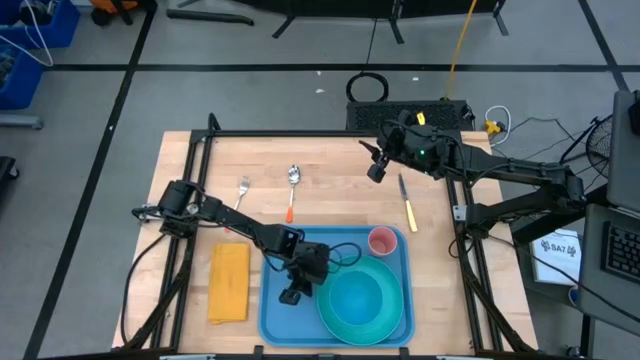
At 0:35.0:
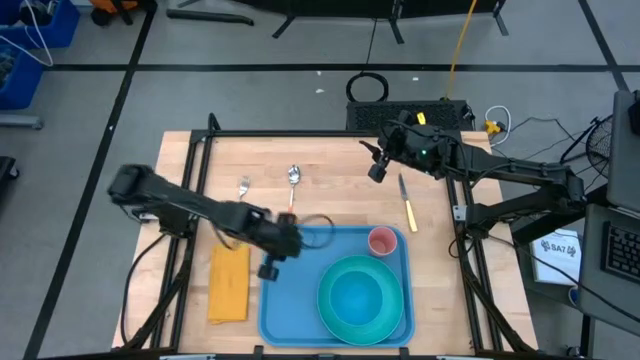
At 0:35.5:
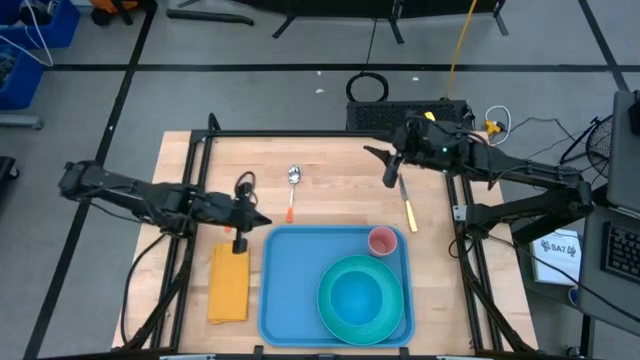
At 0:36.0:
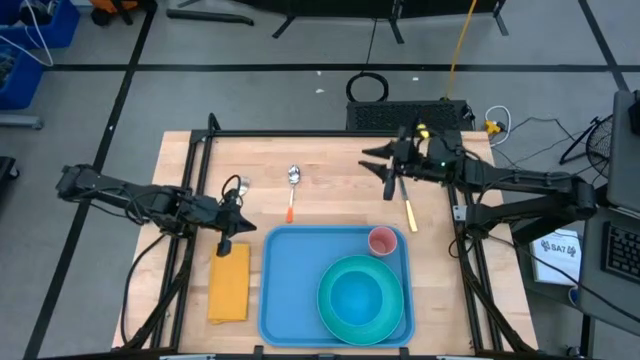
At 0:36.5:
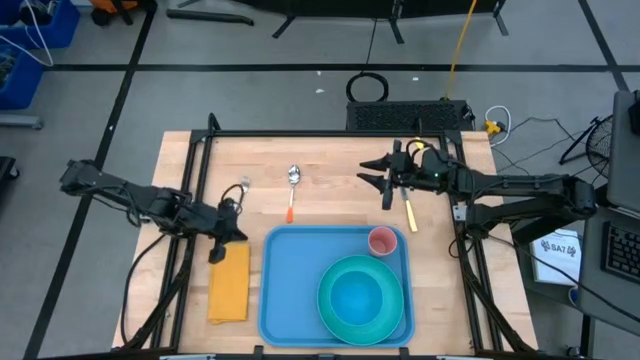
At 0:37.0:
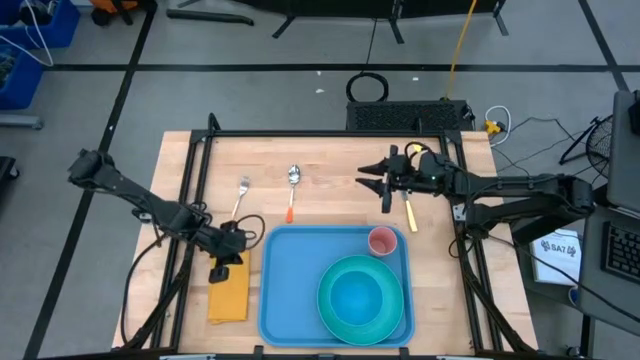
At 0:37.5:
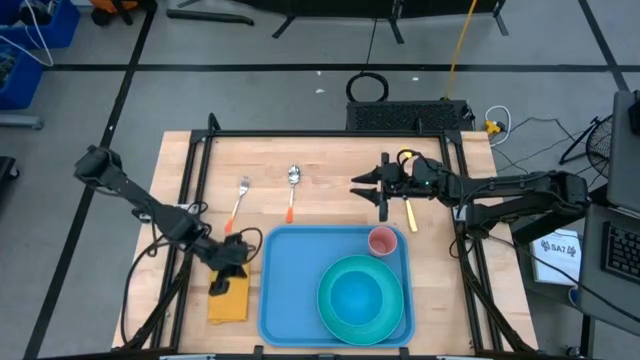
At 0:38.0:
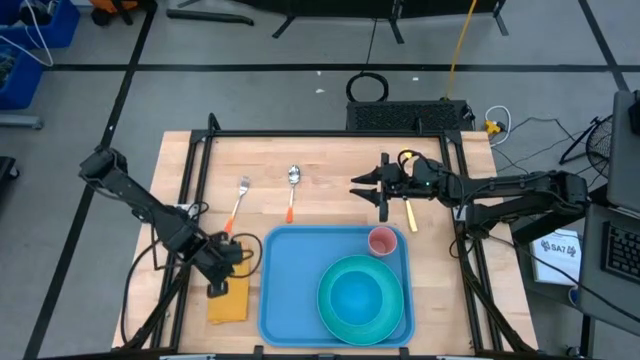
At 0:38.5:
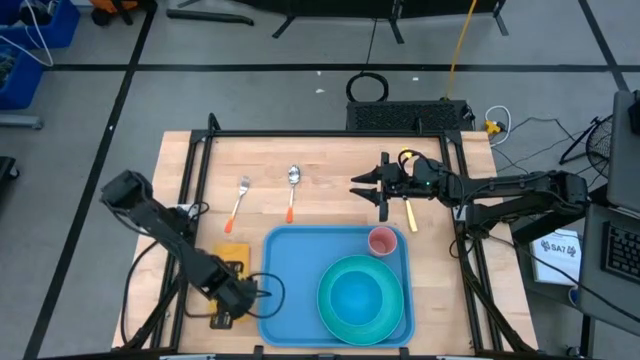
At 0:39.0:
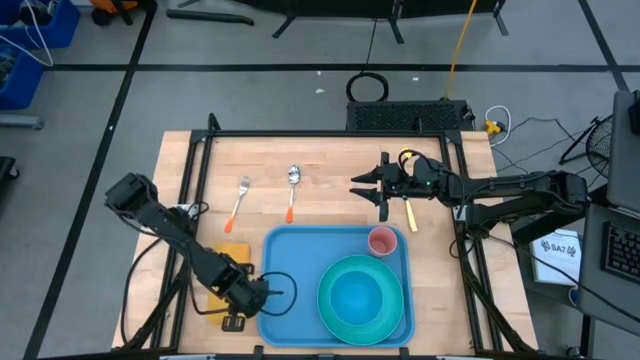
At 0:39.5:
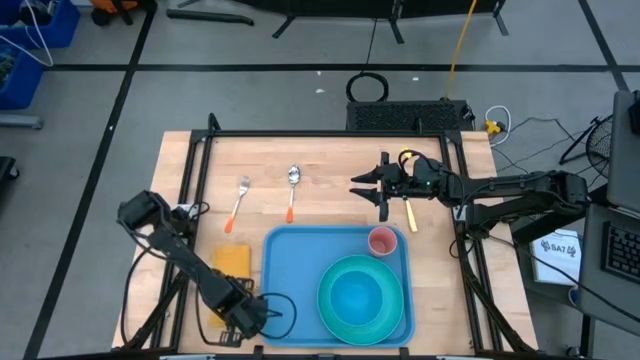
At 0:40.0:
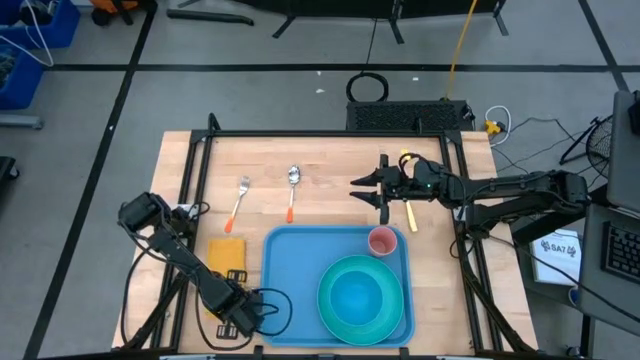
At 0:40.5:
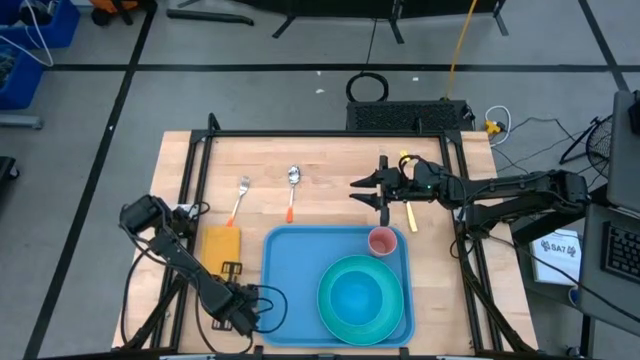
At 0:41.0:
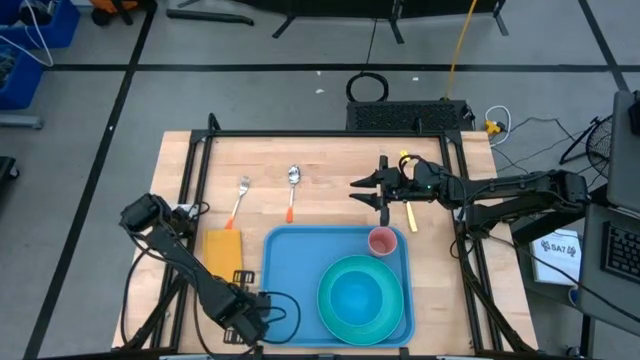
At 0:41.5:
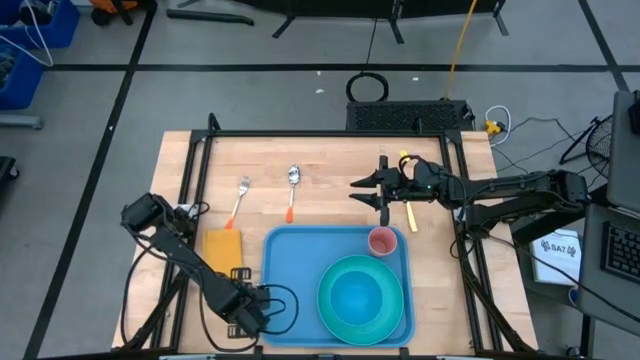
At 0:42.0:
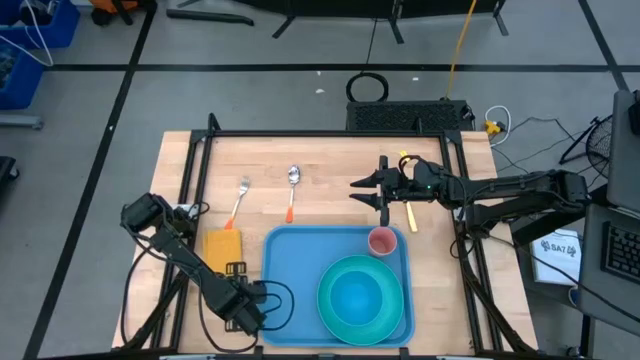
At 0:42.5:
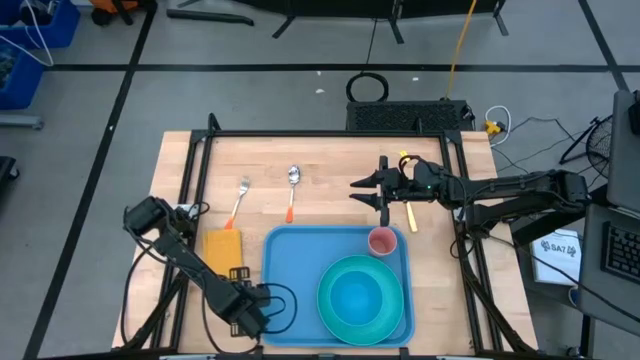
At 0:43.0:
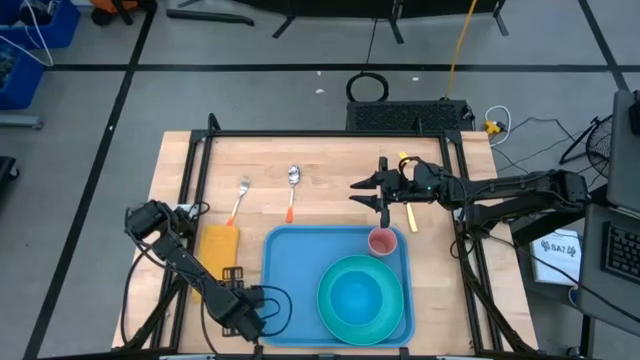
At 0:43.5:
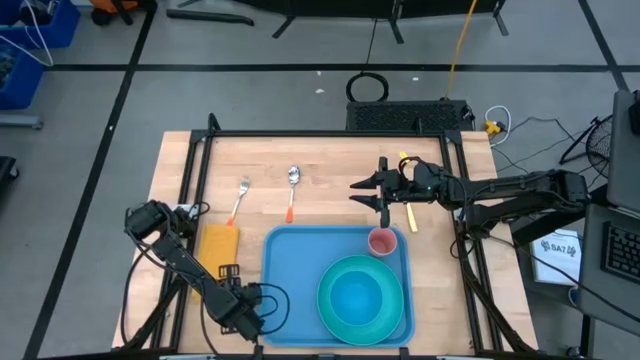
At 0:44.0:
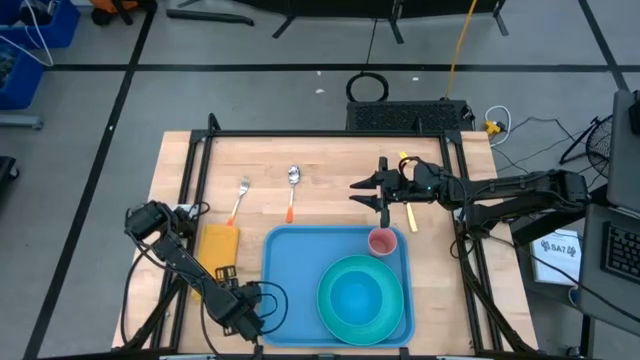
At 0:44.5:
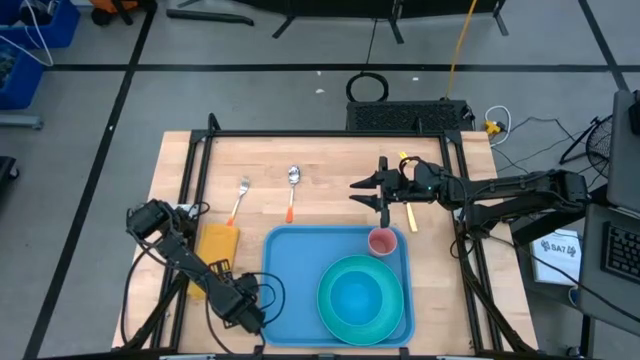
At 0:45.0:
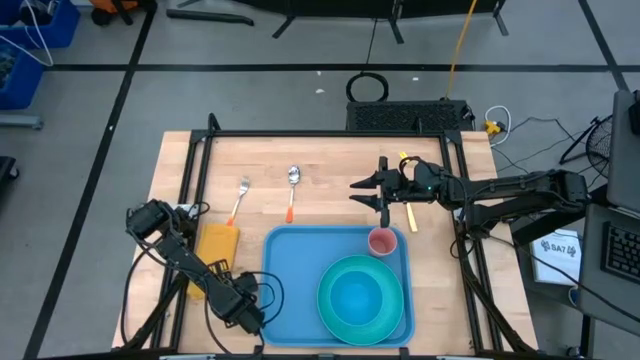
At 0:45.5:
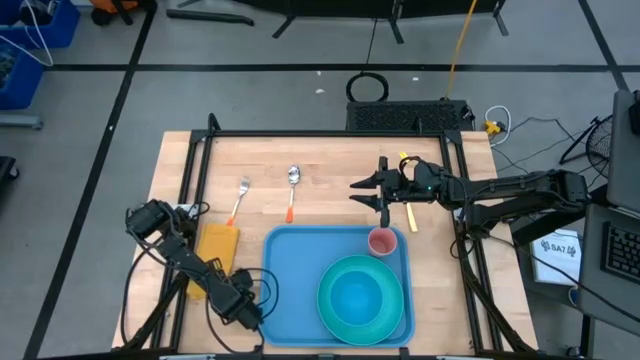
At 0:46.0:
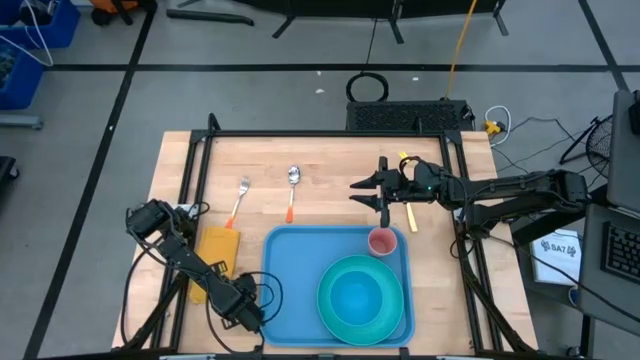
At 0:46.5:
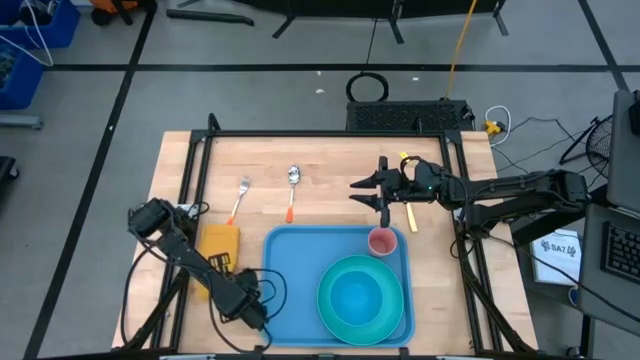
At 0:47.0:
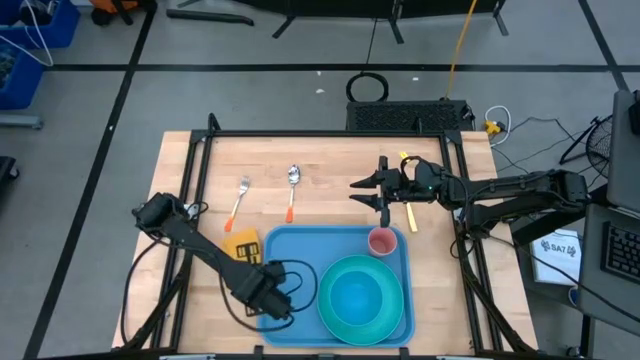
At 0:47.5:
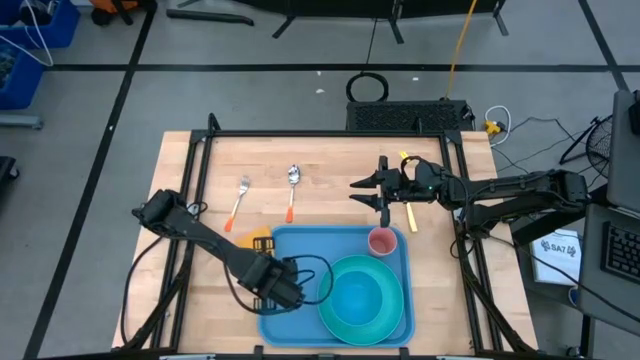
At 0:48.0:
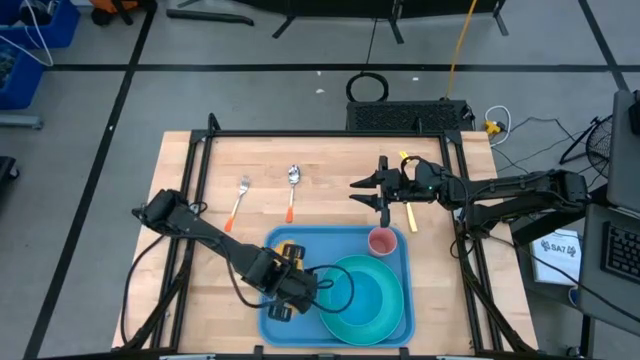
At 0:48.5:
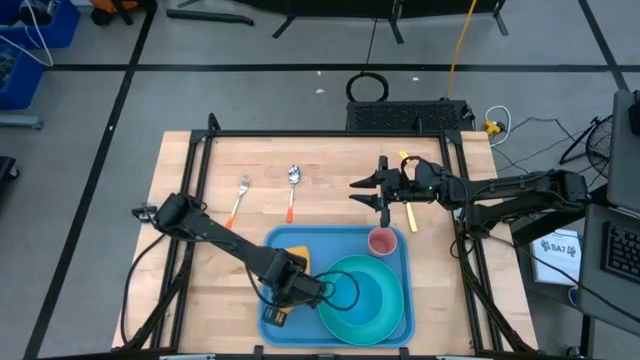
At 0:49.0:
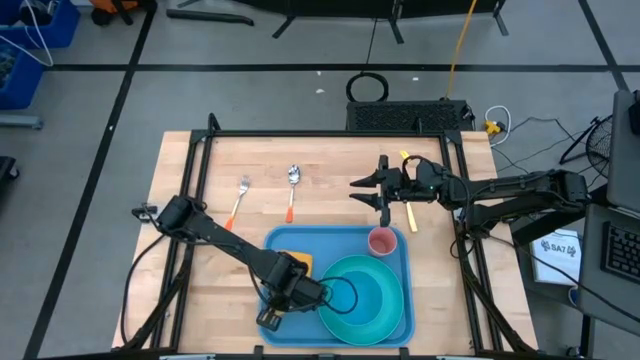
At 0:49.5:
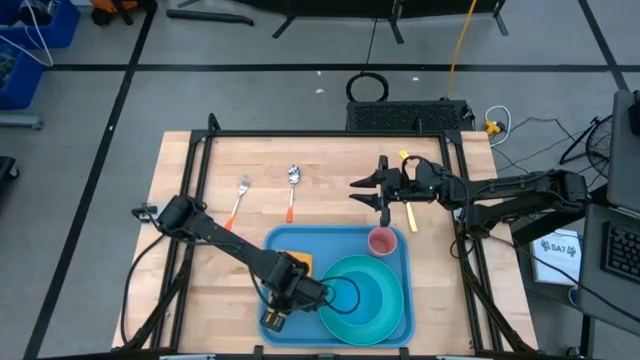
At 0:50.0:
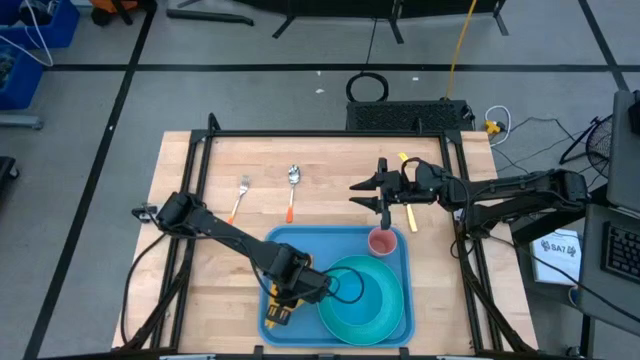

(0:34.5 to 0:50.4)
Task: Set up tray
Put the yellow table napkin on the blue tray to the left of the blue plate

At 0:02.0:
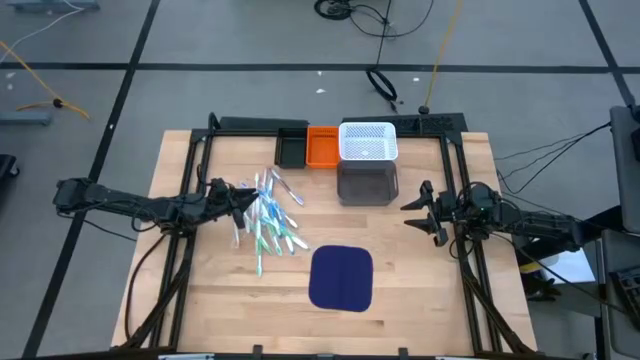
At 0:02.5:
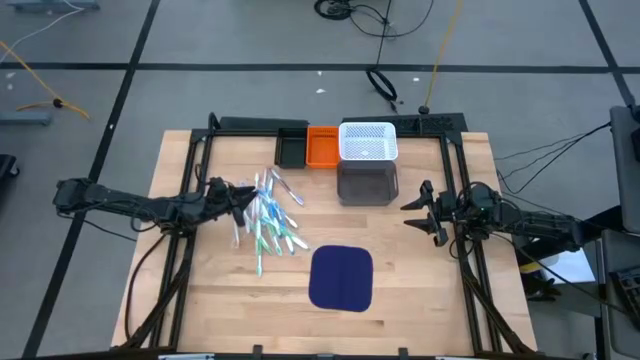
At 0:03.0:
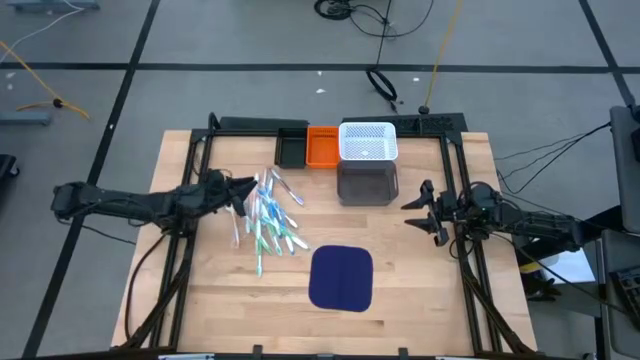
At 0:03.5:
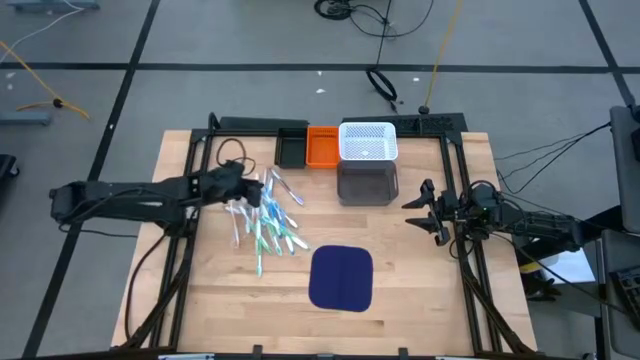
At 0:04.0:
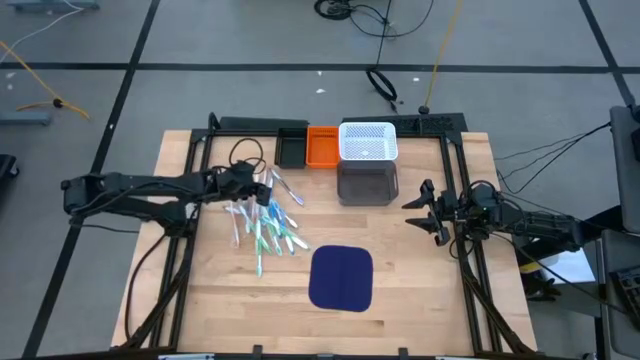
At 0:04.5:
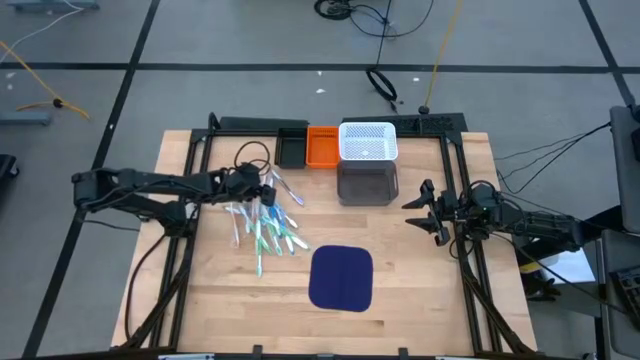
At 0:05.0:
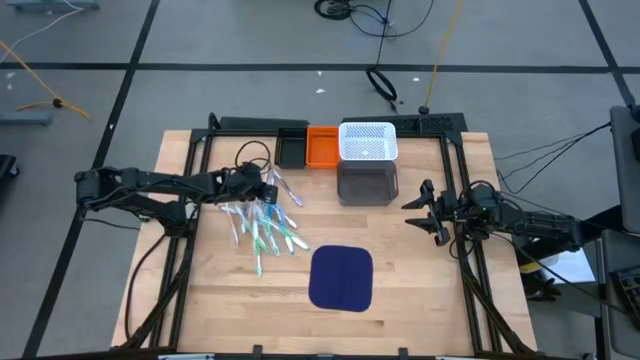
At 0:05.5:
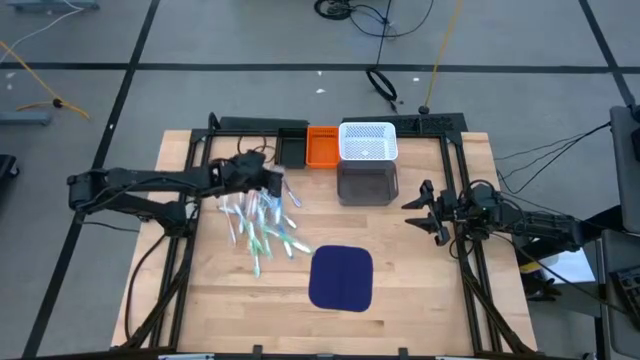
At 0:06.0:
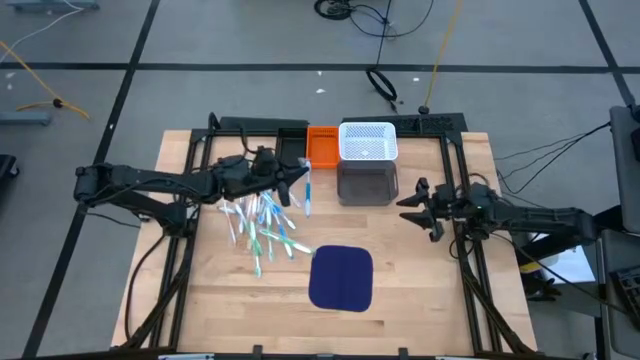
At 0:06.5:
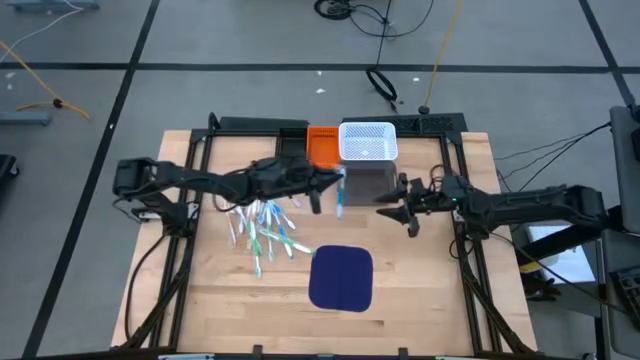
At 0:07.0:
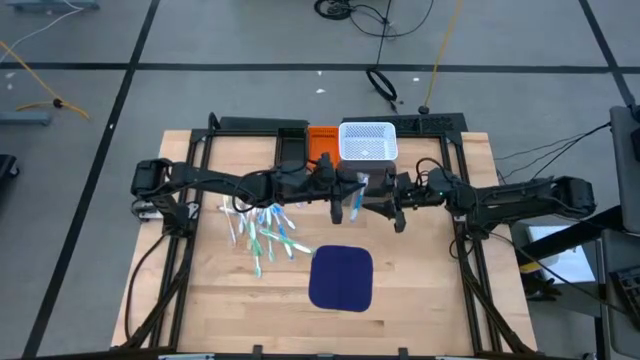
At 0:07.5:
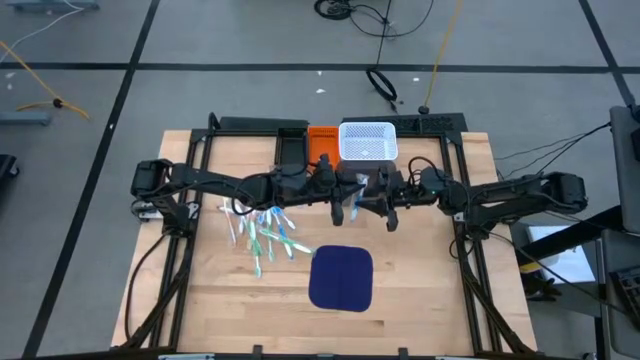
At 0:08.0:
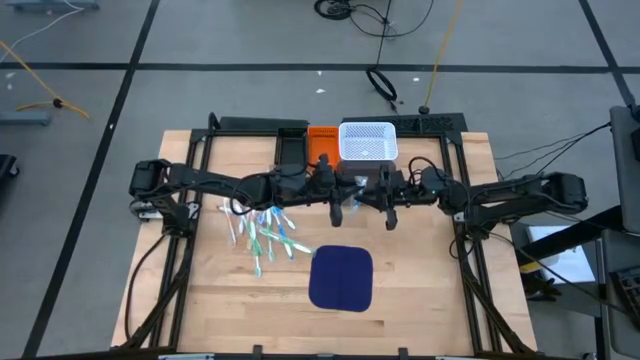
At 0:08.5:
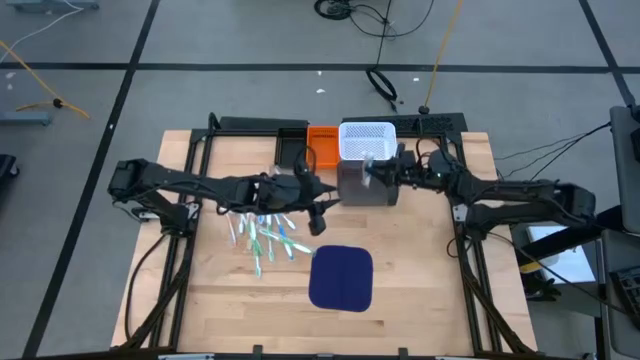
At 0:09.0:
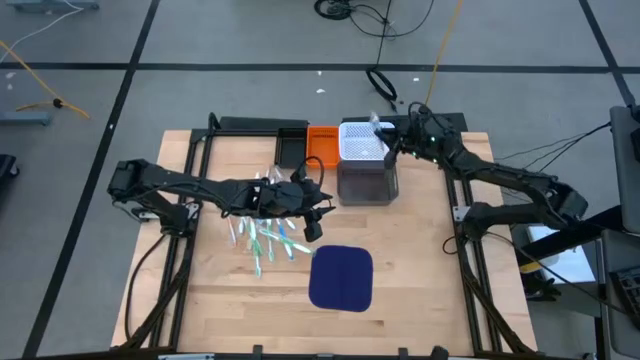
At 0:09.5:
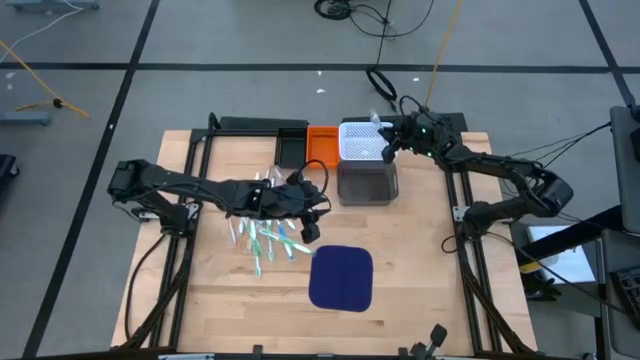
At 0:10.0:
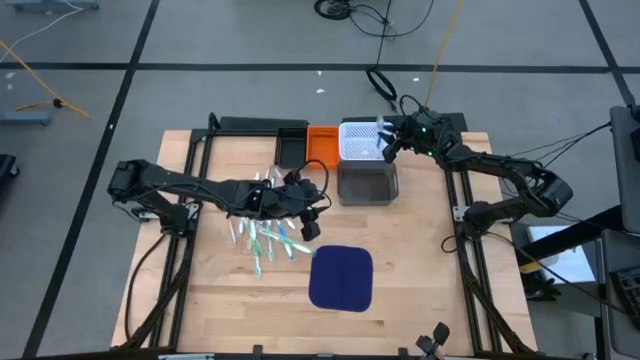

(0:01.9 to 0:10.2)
Task: Pick & Place Toothbrushes
Put the blue toothbrush into the white basket
